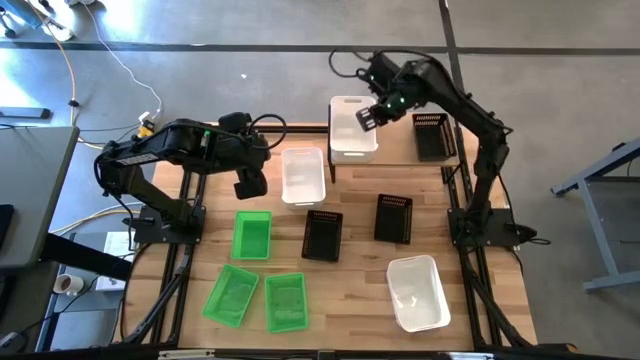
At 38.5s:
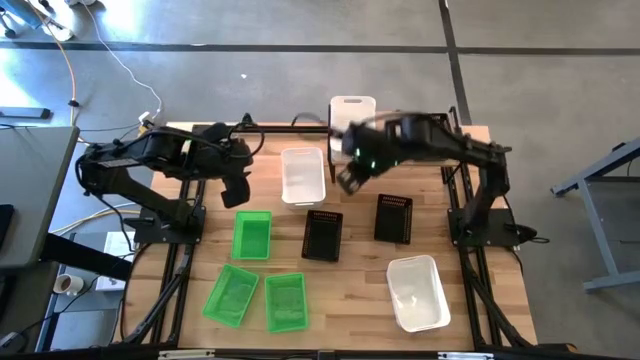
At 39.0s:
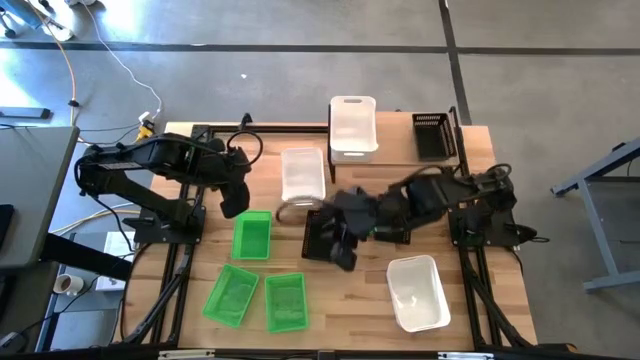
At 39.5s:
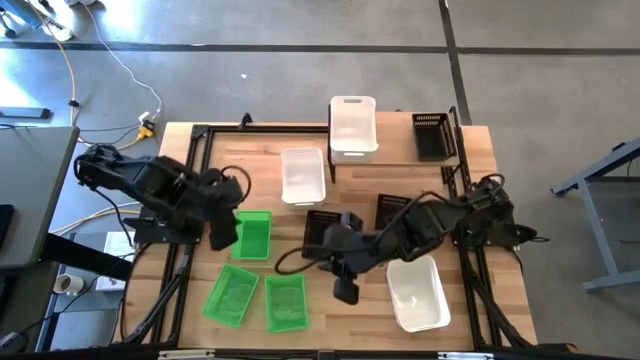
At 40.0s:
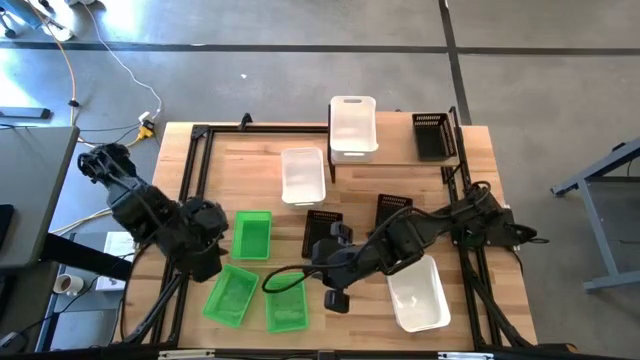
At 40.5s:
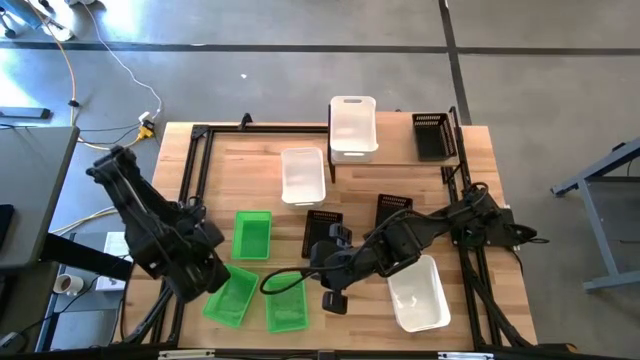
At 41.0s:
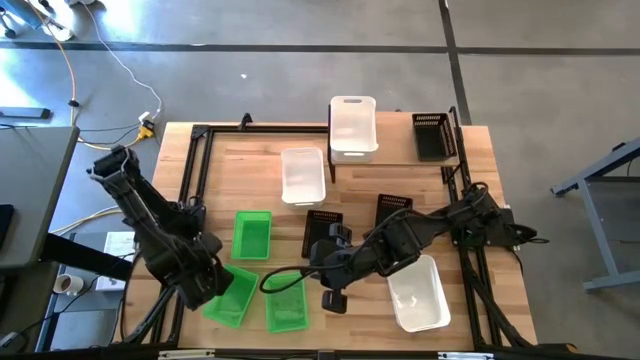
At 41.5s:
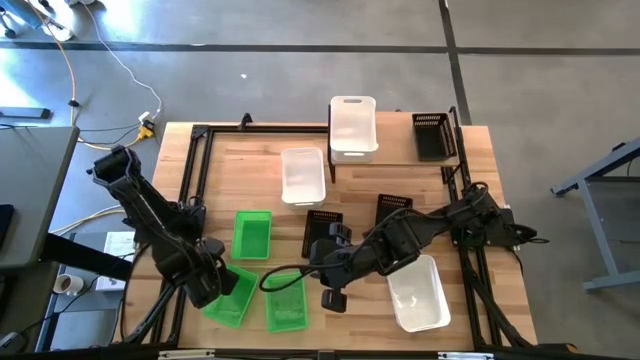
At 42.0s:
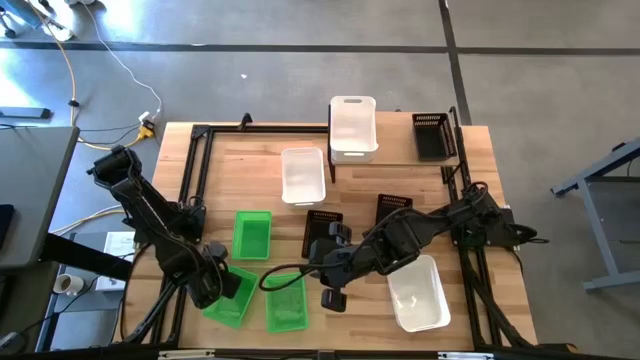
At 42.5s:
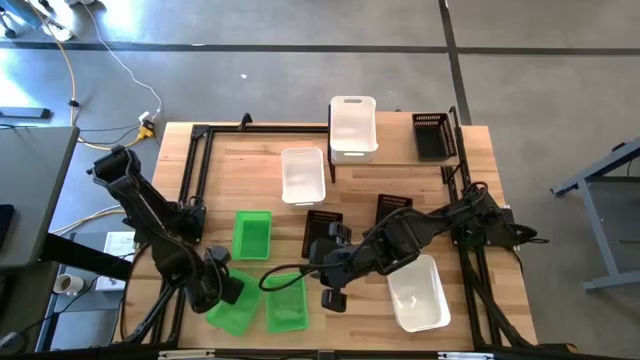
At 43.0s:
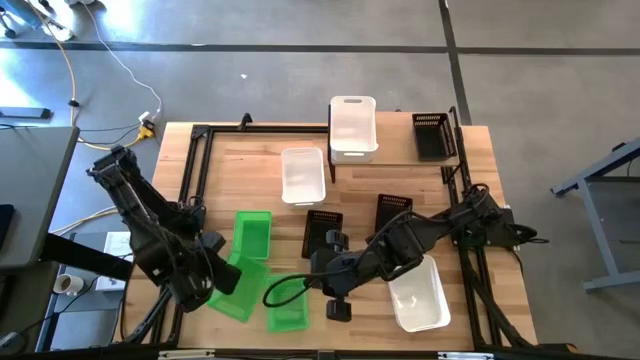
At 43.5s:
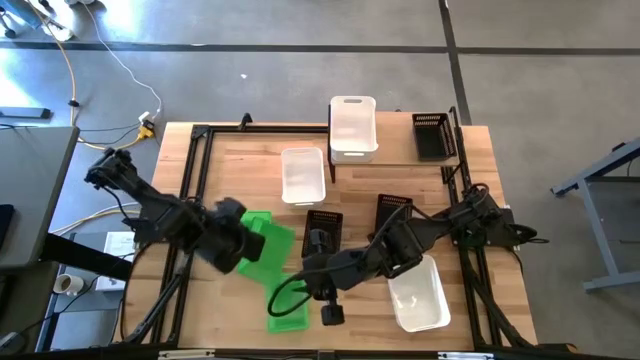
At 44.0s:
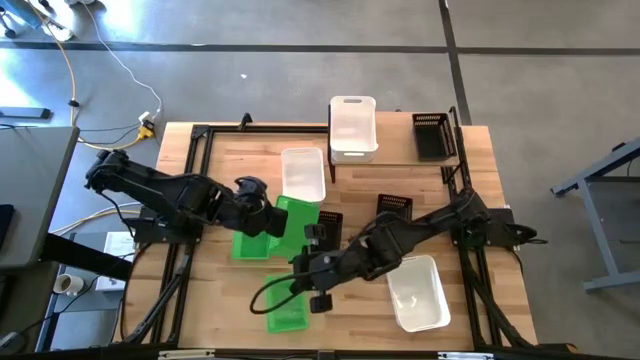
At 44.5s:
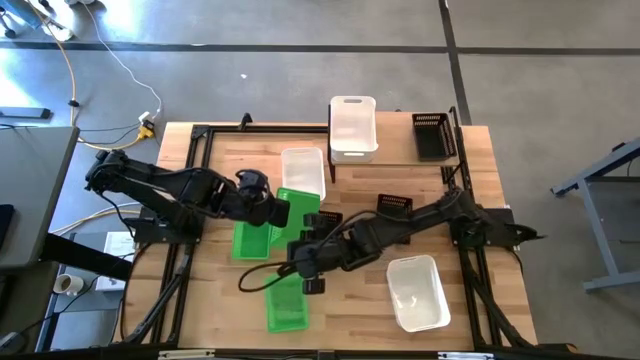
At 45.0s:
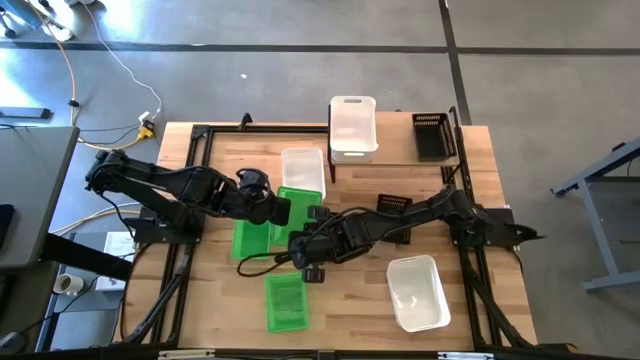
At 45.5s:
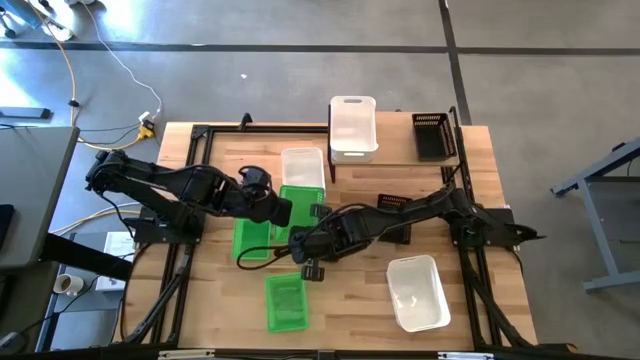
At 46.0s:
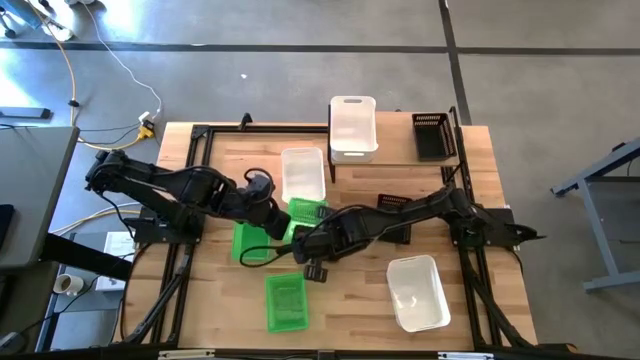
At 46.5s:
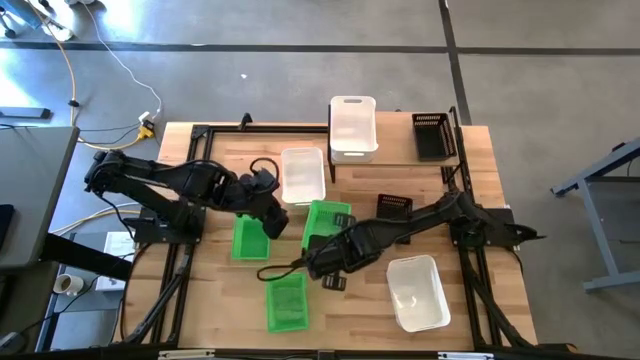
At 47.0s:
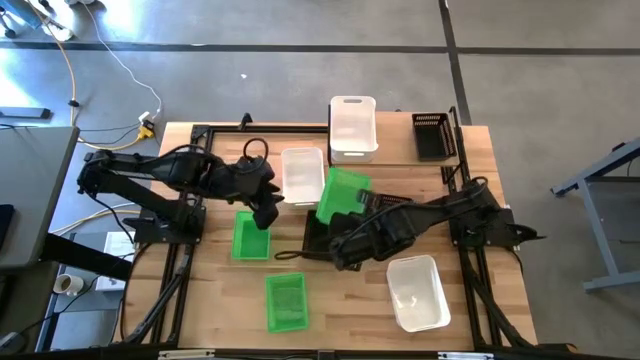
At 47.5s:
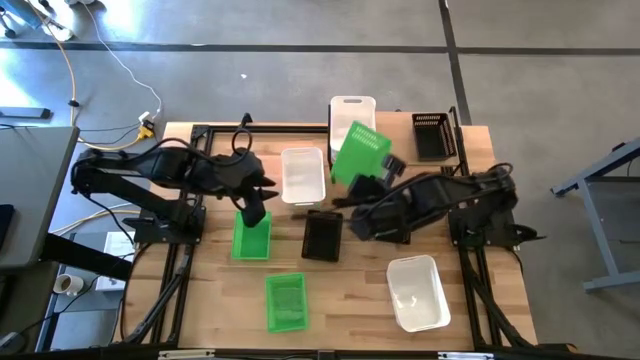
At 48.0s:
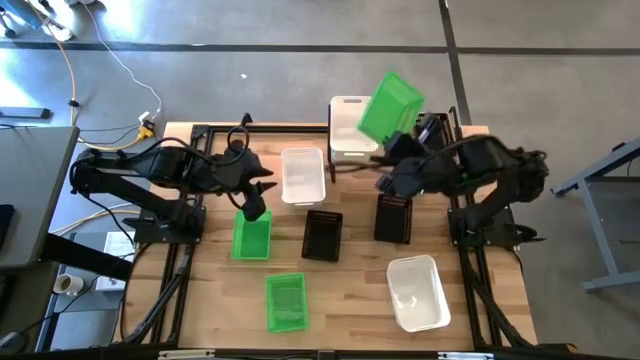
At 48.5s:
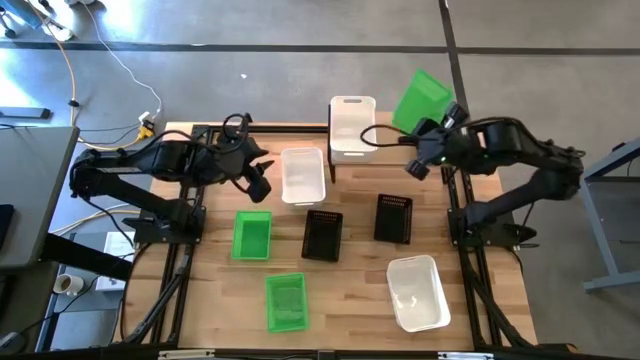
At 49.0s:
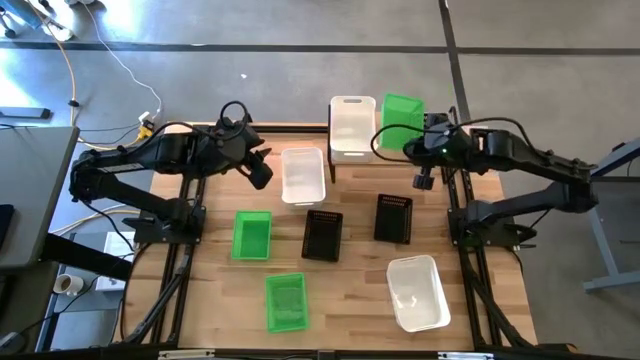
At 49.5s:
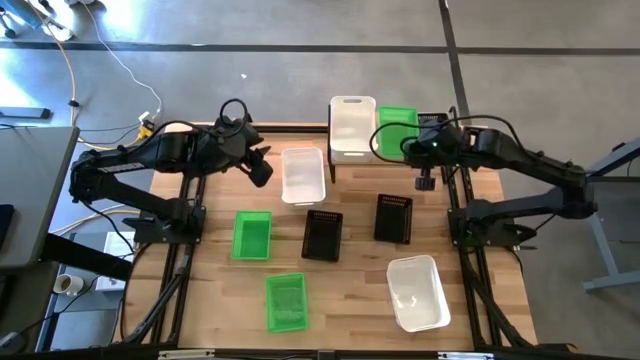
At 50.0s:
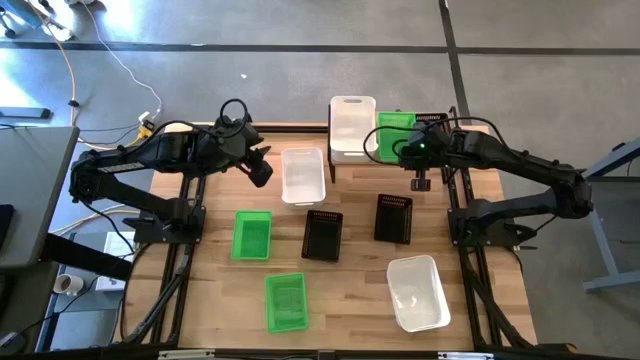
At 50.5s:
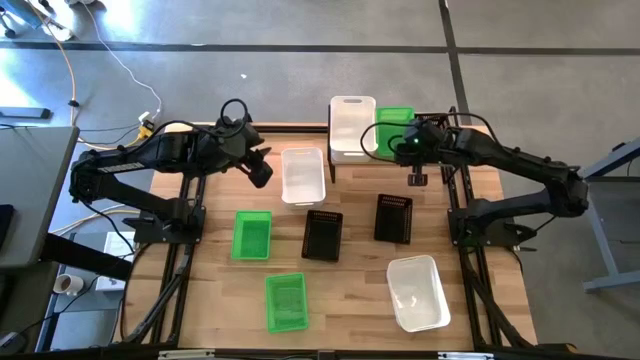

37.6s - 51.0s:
Task: Stack baskets on shelf by color
Put the bottom left green bin on the shelf

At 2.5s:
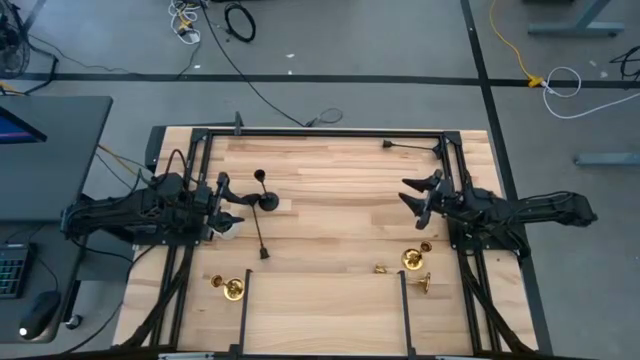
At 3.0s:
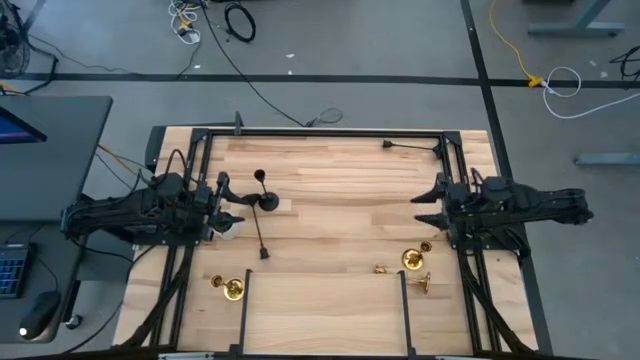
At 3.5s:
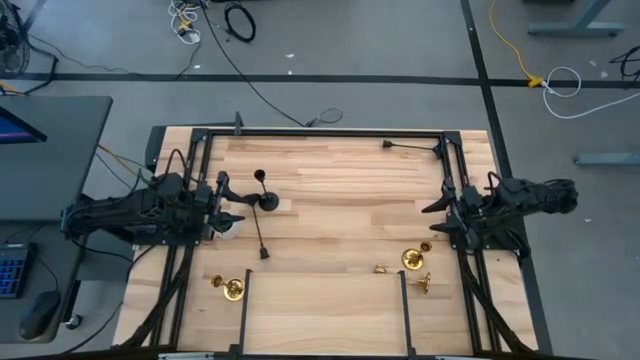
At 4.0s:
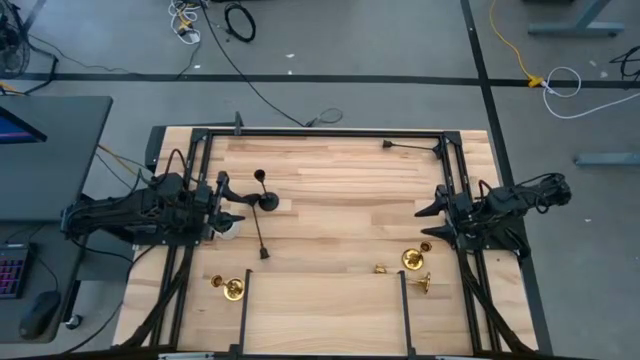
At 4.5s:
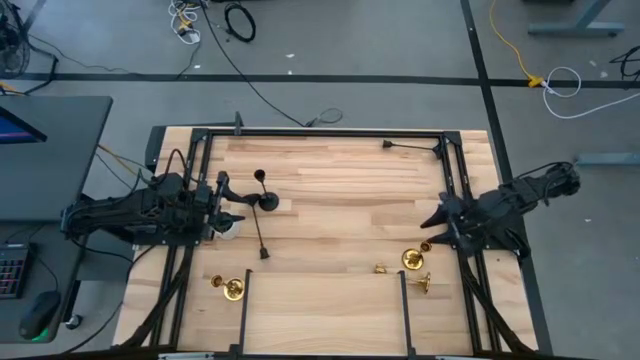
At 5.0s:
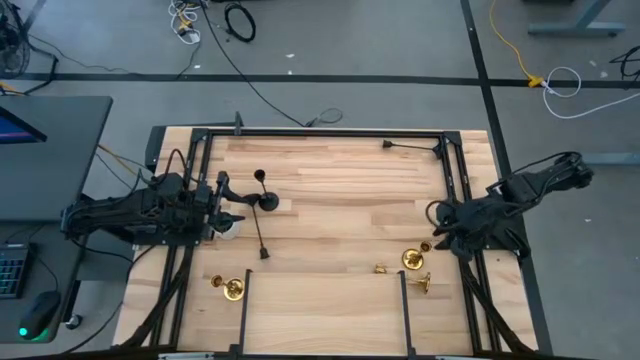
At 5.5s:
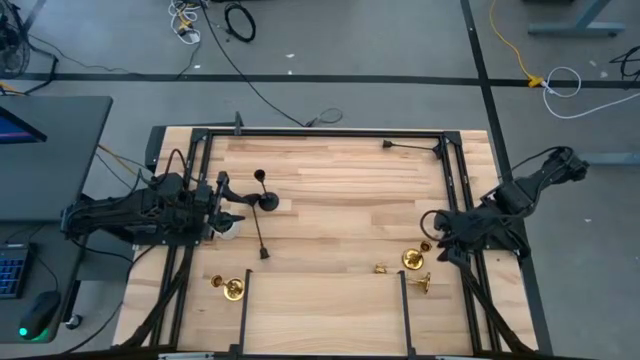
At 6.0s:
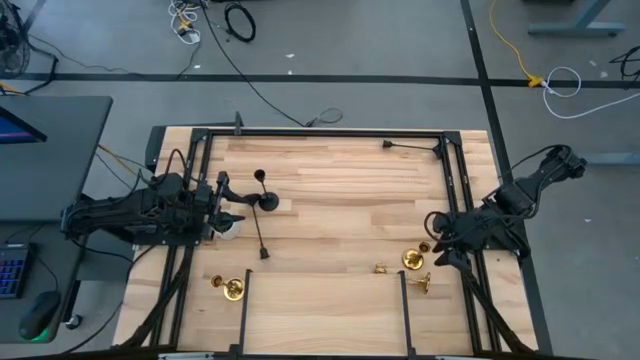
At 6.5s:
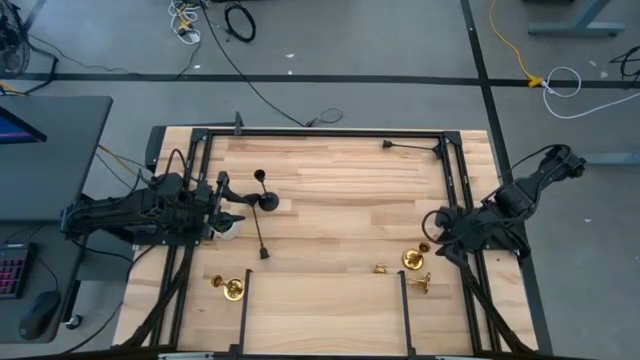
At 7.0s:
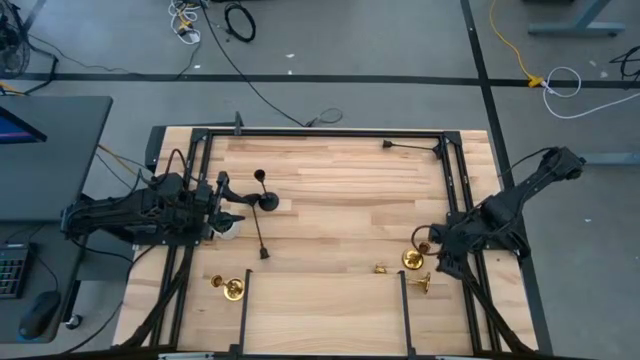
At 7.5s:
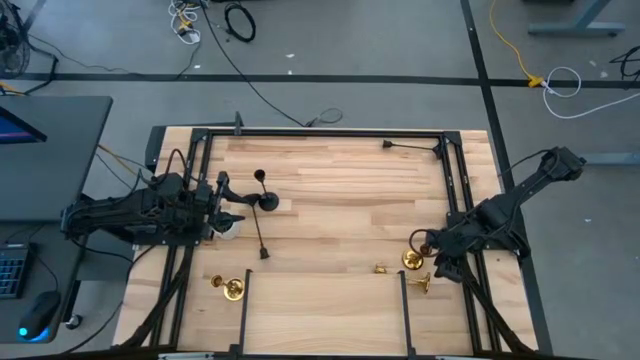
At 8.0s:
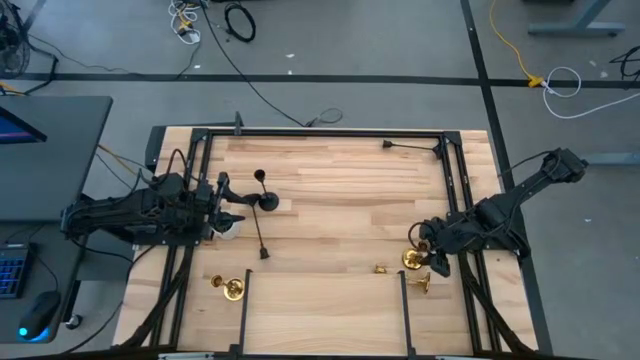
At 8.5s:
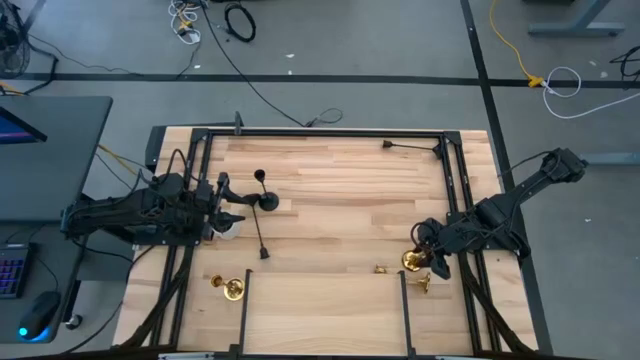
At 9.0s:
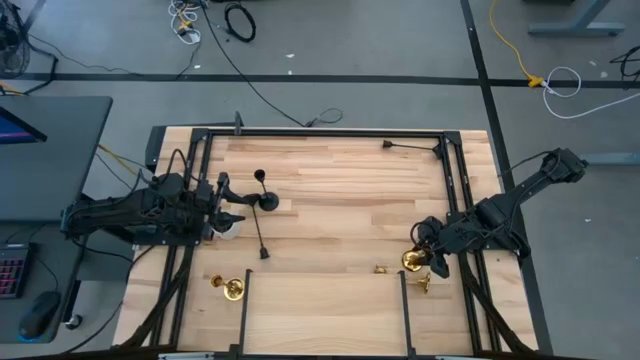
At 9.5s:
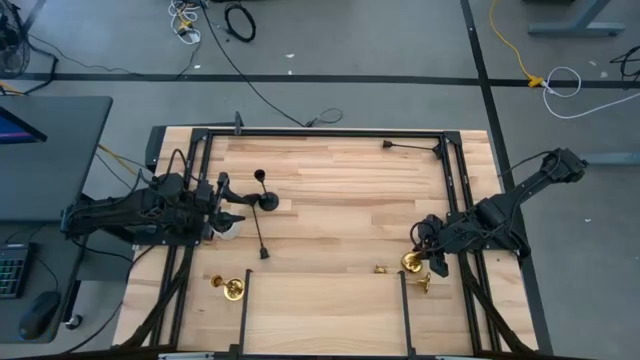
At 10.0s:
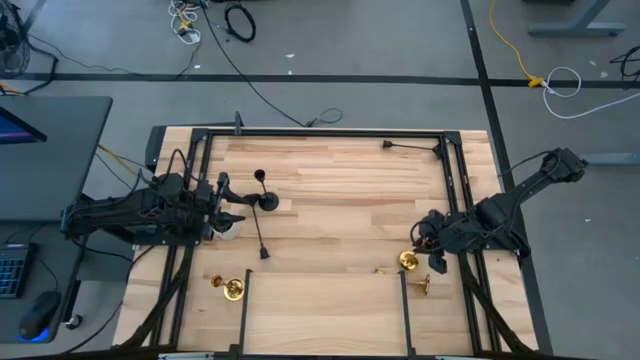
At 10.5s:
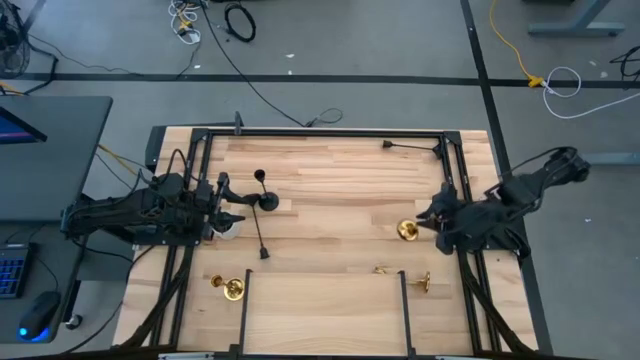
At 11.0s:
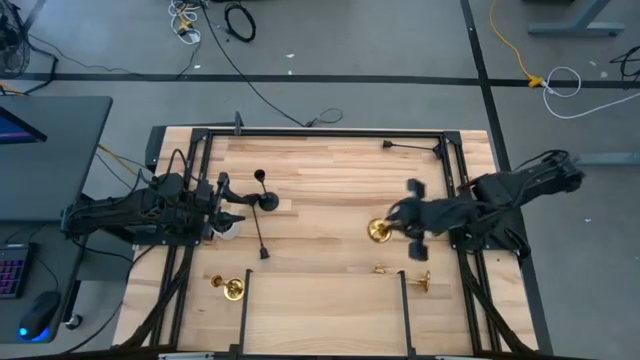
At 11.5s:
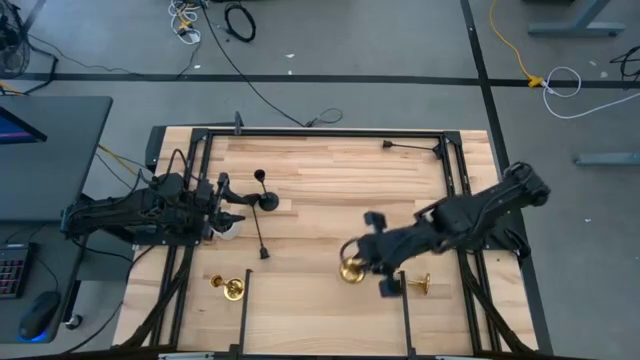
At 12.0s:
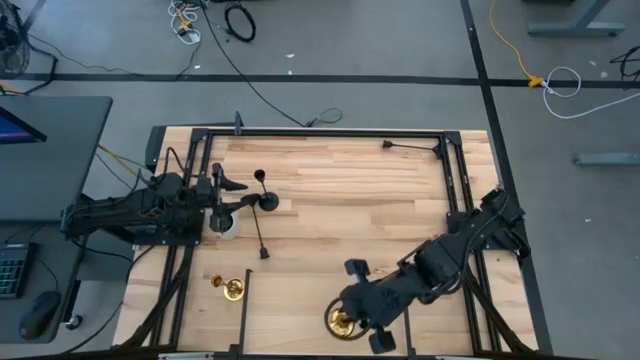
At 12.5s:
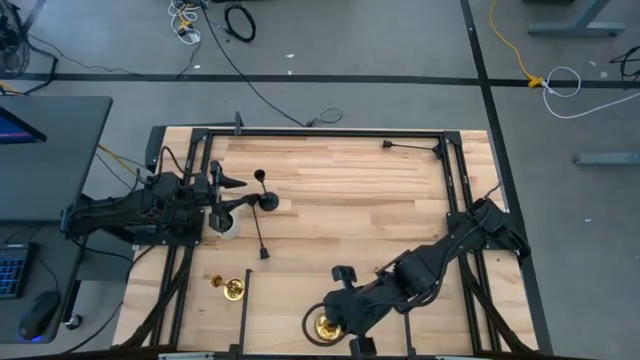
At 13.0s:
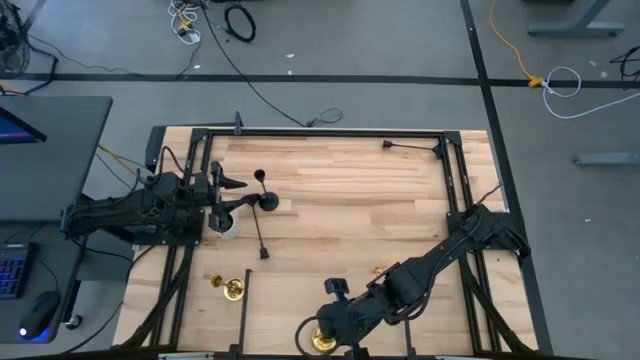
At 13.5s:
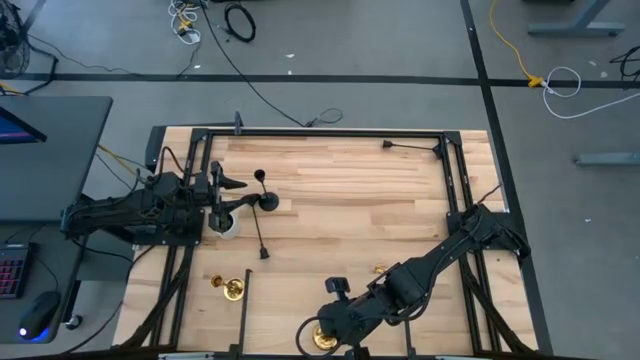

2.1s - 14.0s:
Task: Pick & Place candle stick holders
Put the top yellow candlestick on the shelf
